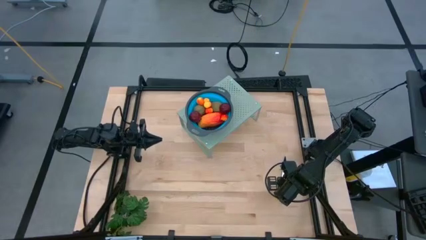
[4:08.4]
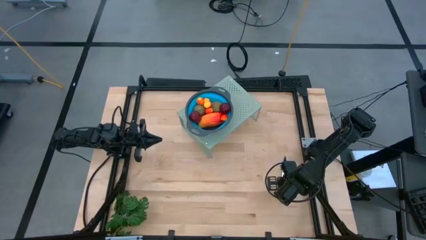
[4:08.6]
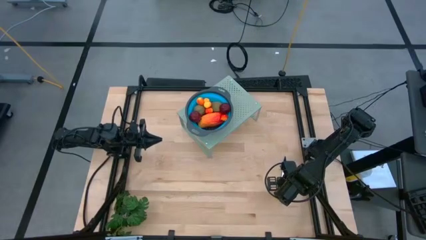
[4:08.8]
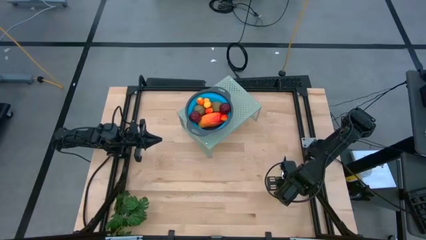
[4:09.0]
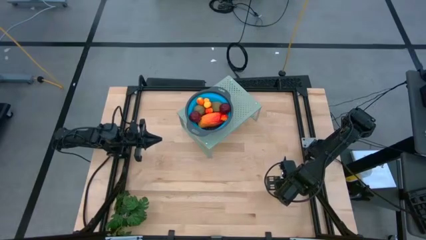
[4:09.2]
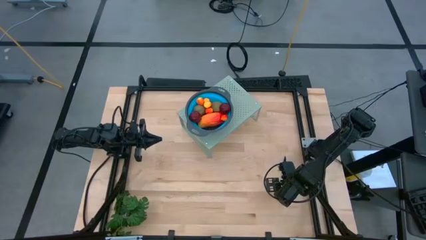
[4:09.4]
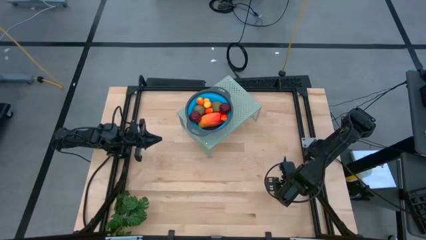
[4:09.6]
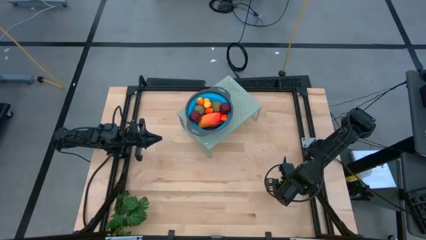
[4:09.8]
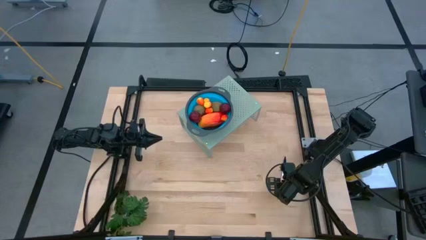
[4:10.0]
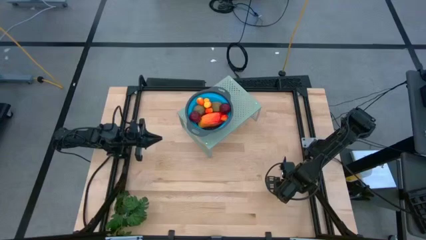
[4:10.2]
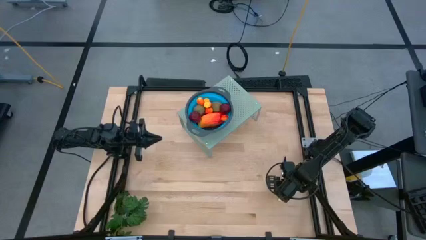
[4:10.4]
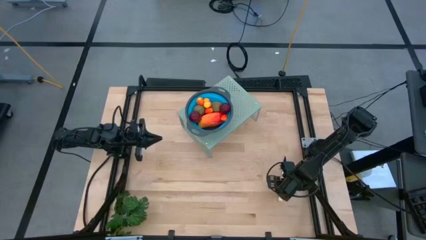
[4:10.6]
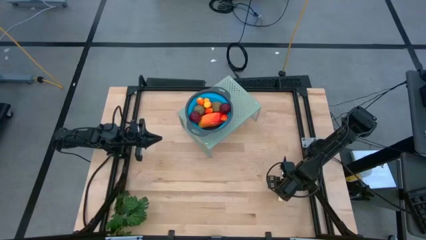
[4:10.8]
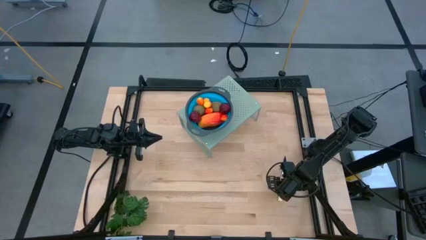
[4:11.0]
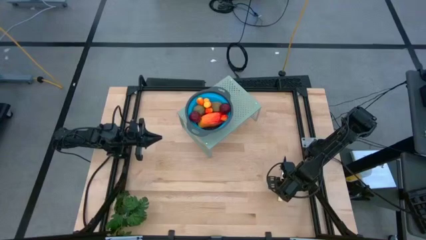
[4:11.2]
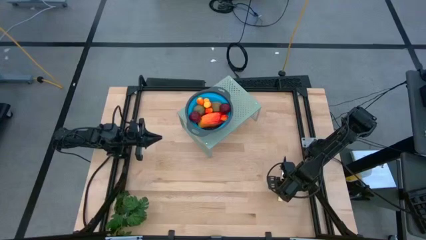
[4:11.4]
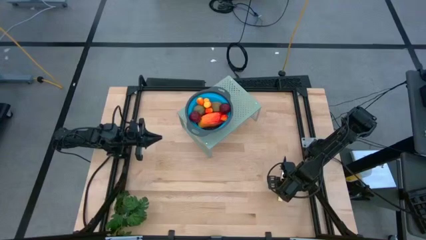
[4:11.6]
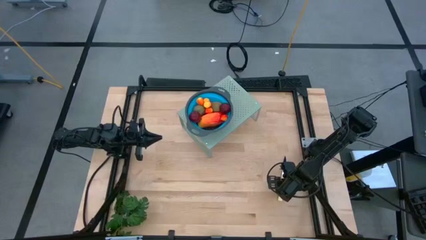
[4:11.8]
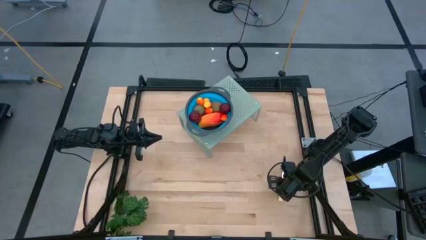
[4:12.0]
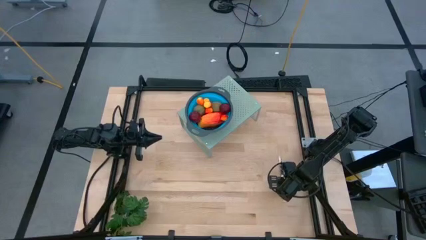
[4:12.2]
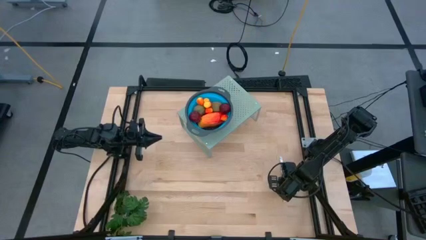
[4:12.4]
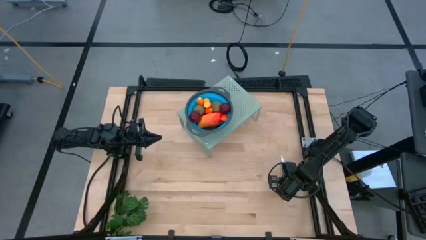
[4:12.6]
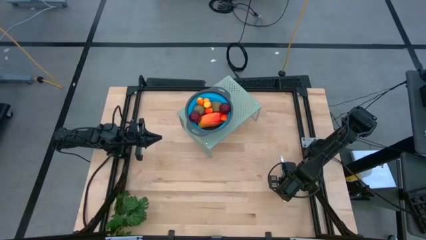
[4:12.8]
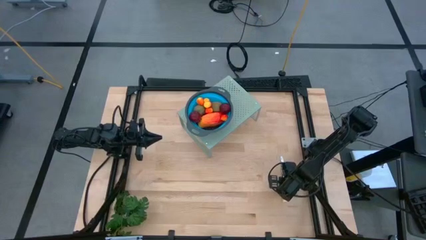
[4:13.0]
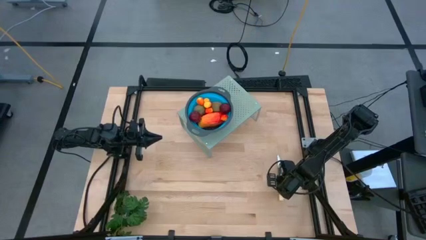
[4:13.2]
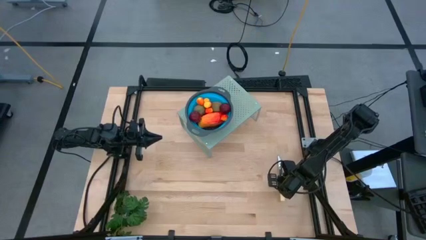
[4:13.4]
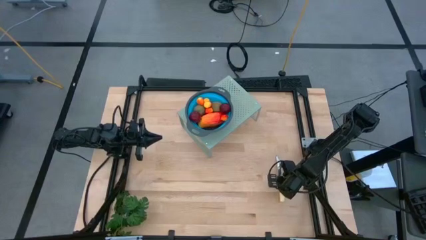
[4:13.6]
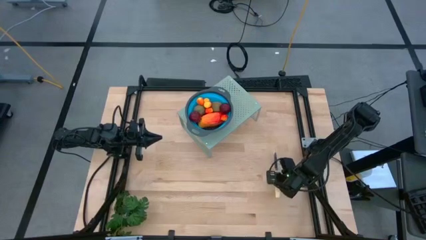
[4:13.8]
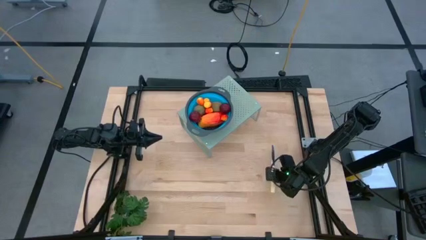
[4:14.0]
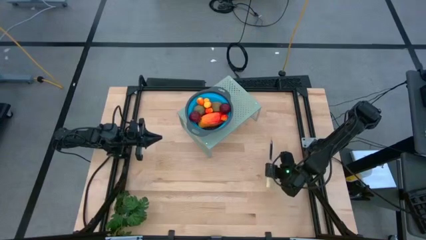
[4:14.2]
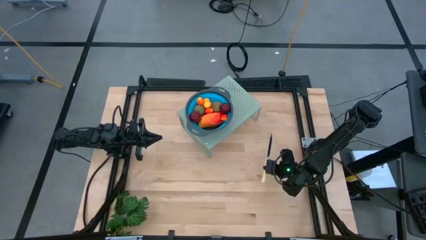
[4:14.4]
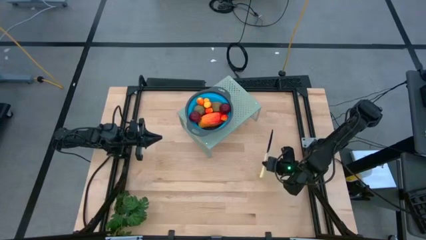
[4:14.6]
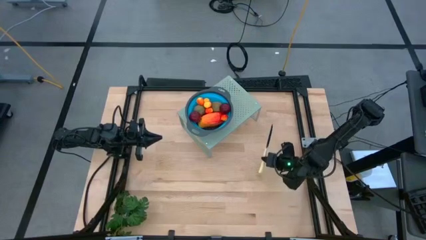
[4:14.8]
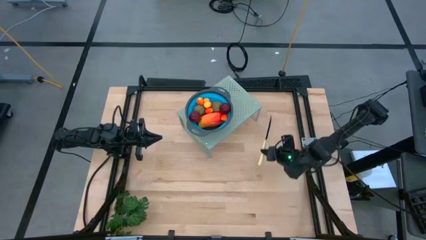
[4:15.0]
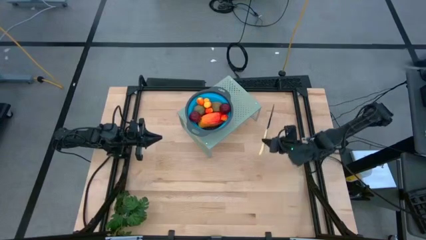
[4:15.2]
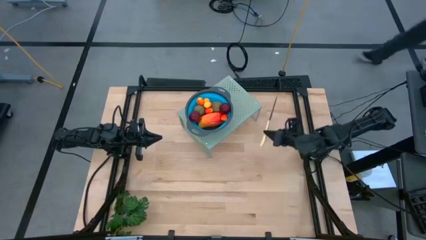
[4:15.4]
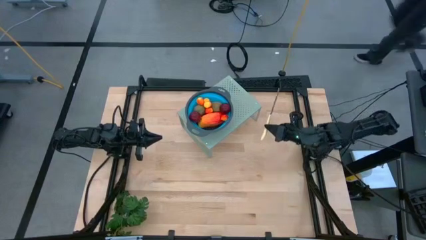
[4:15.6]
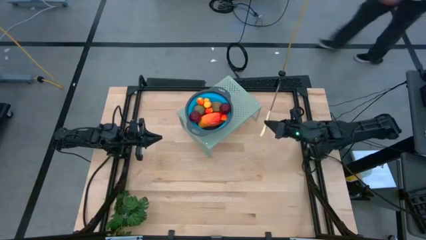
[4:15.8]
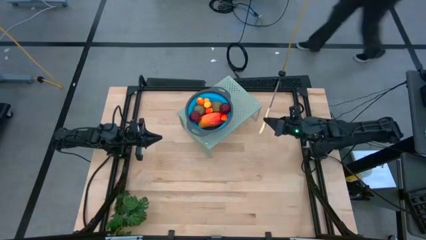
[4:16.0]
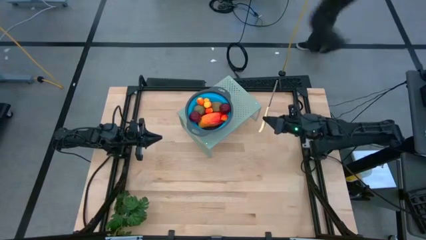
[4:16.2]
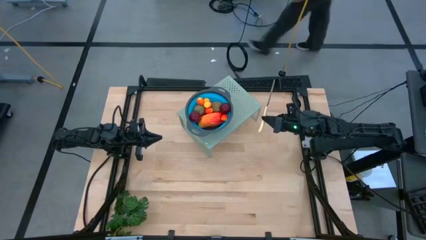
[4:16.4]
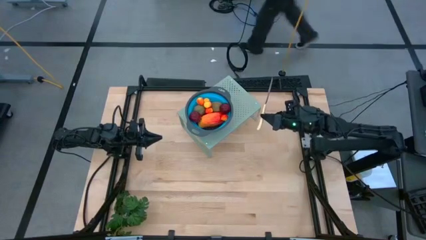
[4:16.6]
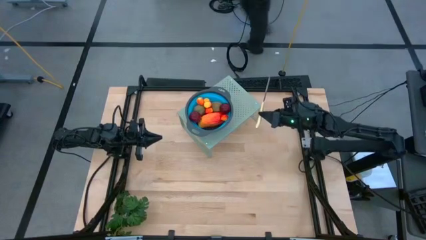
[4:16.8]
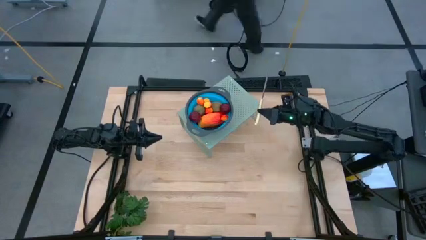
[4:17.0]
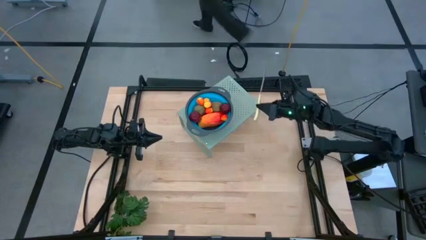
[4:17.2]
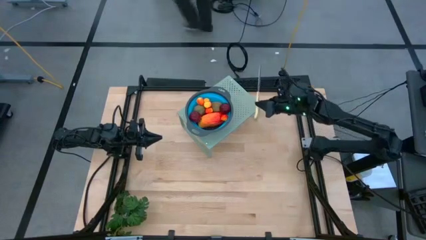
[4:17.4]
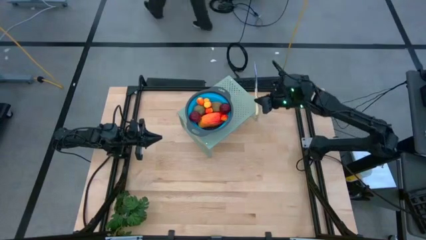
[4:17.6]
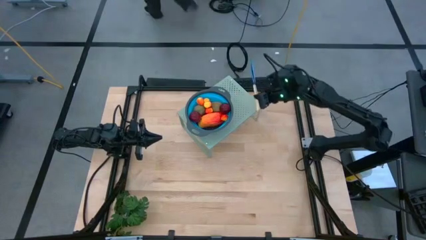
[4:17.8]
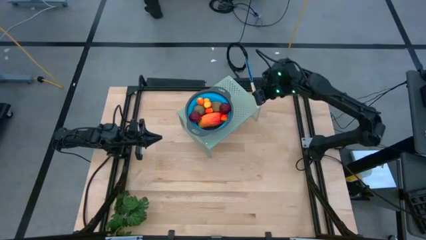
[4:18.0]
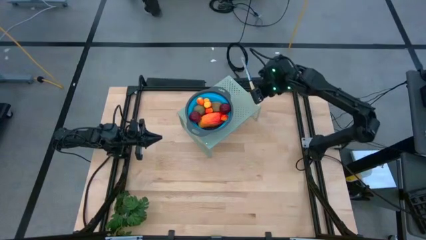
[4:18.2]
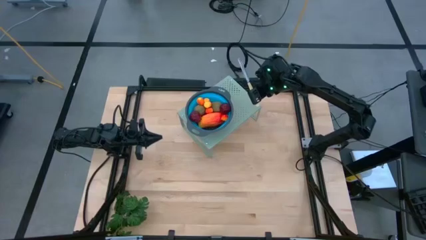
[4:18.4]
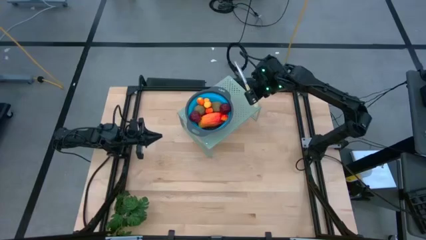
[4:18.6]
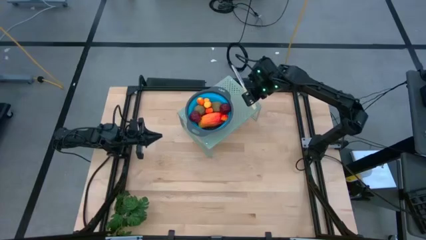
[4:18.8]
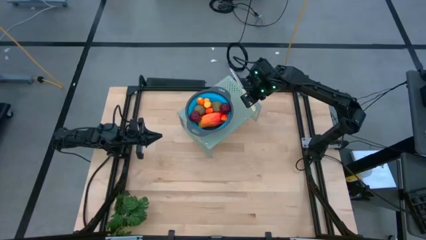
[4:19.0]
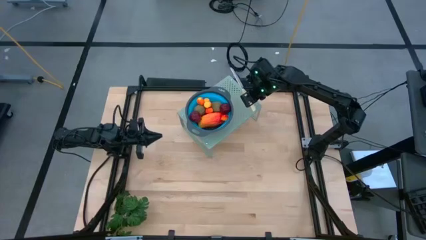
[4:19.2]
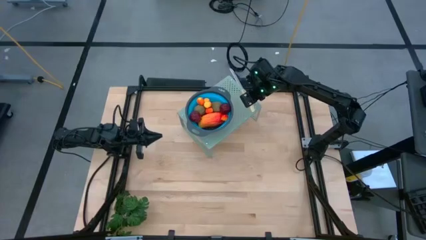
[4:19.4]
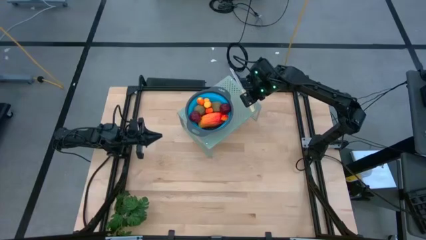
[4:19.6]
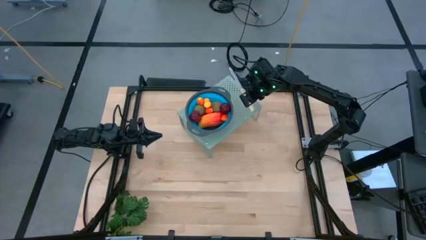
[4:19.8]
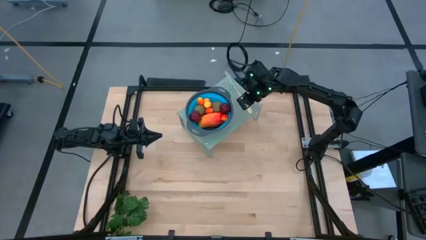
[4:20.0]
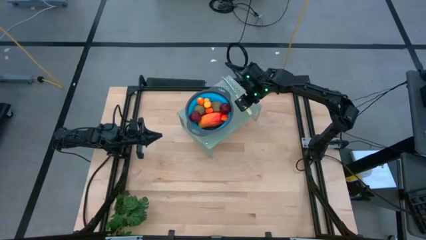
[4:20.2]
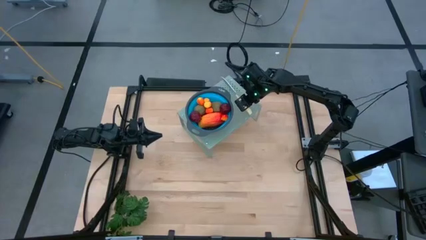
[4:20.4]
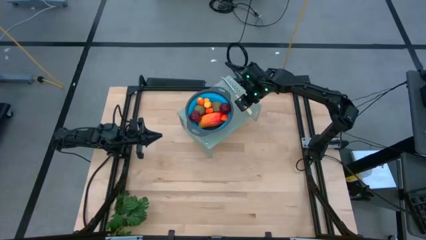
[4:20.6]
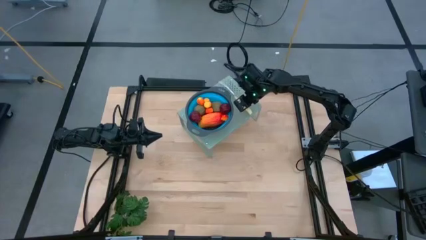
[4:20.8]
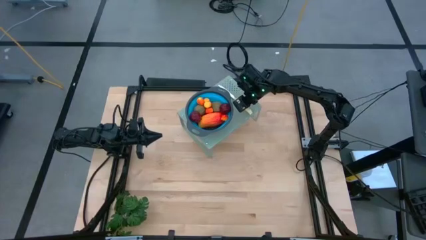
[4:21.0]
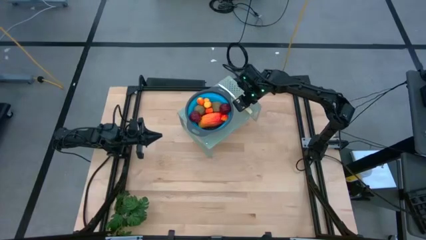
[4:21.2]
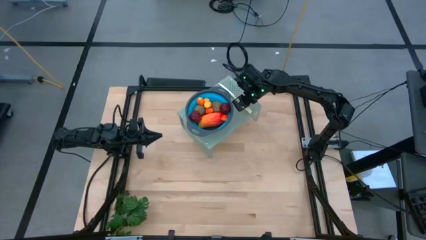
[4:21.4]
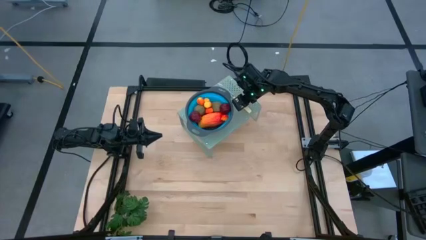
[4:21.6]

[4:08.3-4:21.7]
Task: Pick & Place Fruit
Put the yellow table knife on the shelf to the right of the blue strainer bowl
